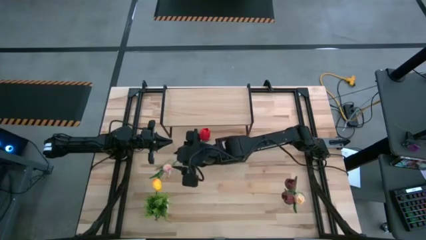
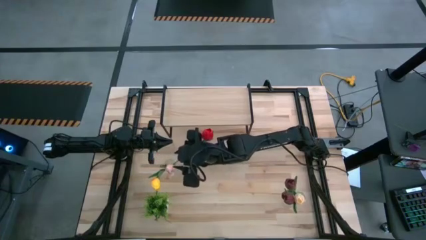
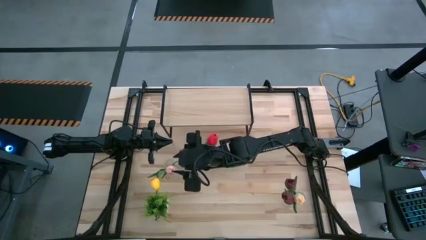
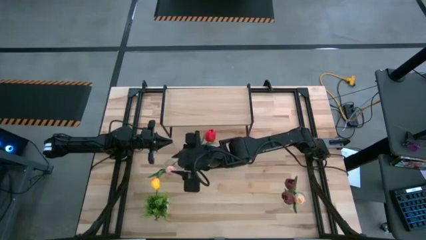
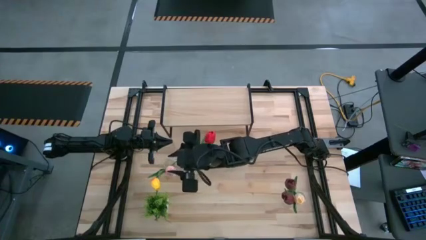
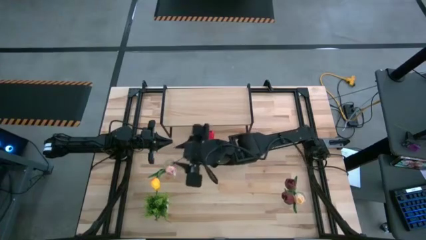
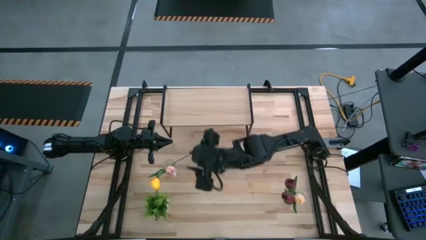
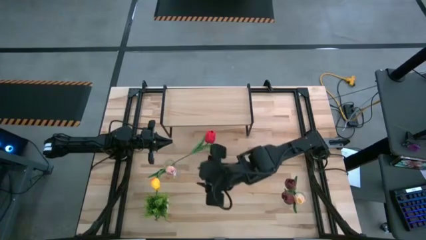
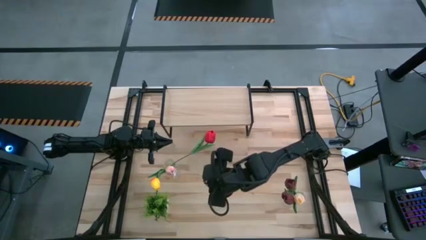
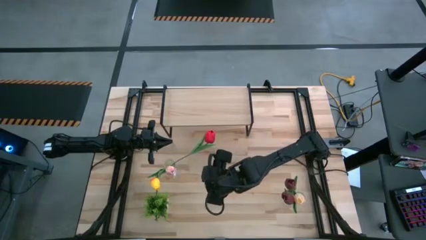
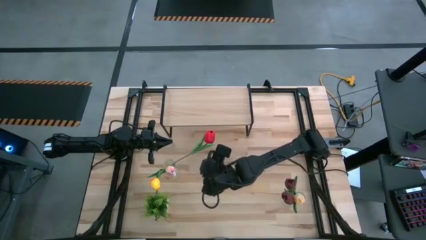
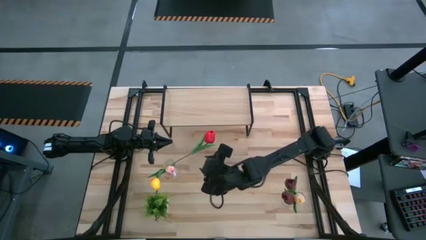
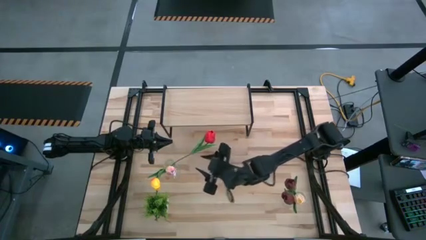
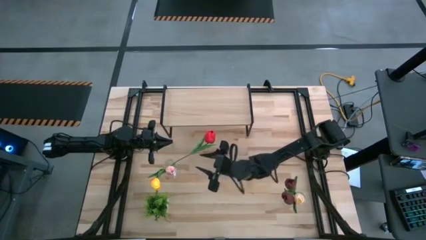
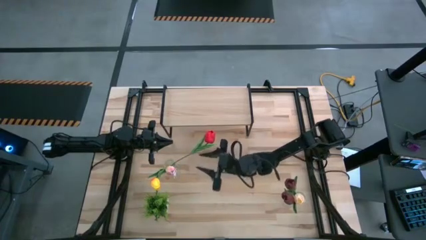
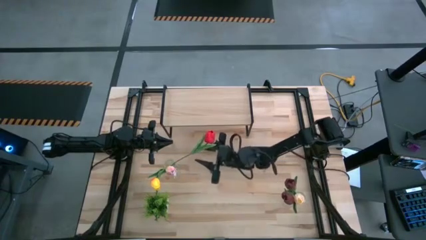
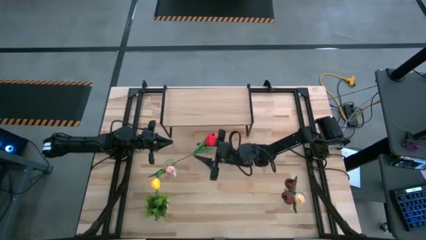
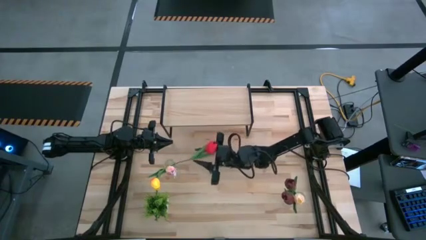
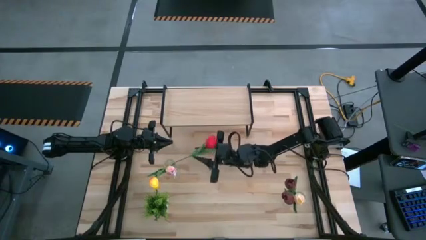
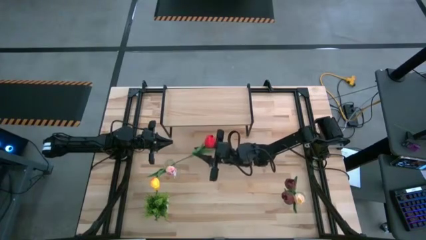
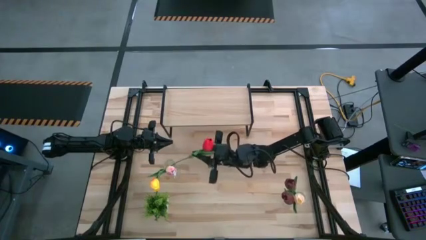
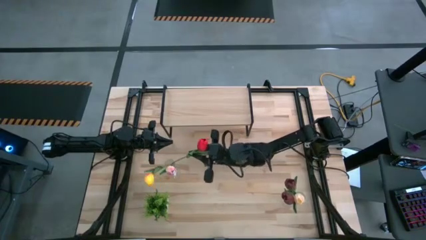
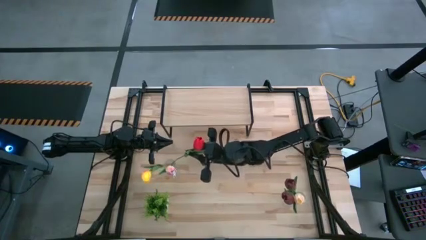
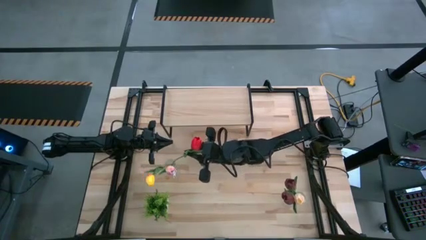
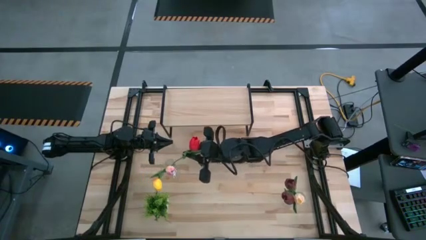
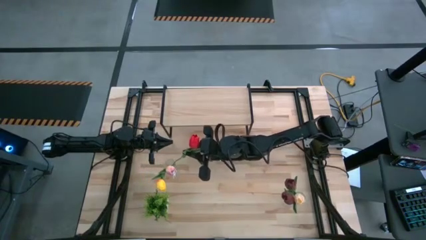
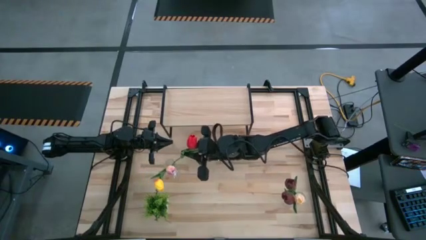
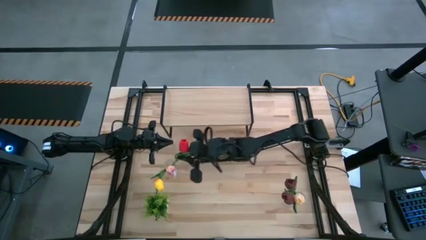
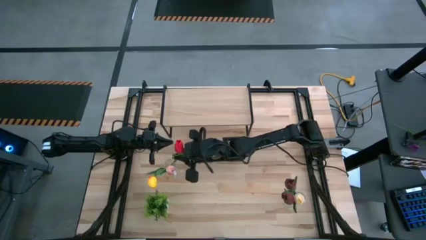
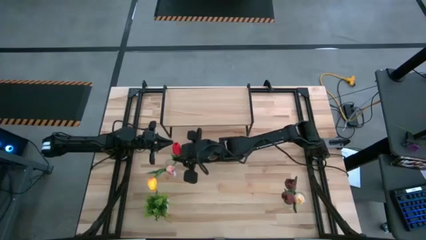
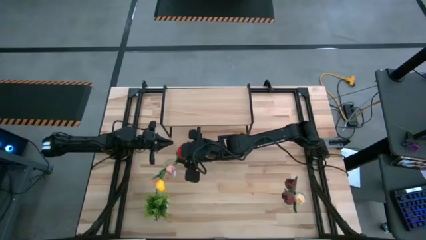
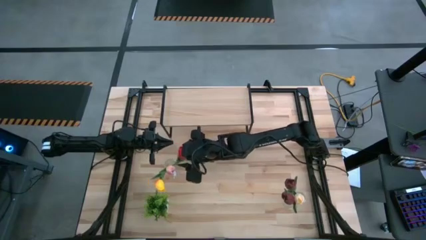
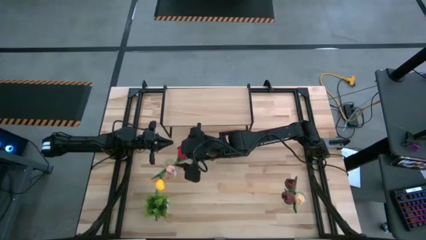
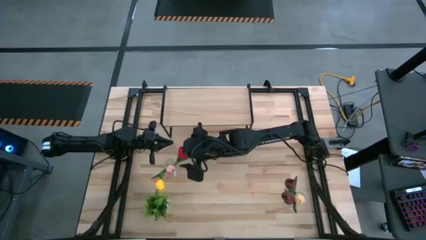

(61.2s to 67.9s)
Task: Pick and place flowers into a vace then onto a shelf
Adjust the red flower in the left transparent flower vase

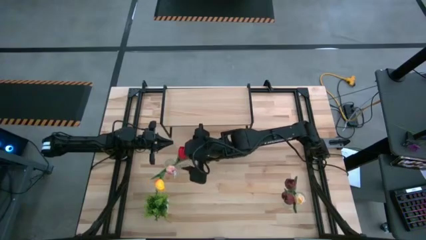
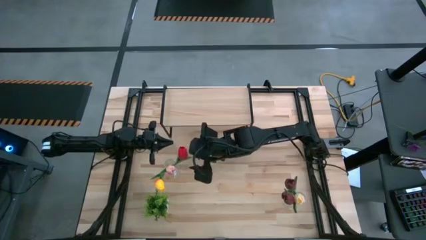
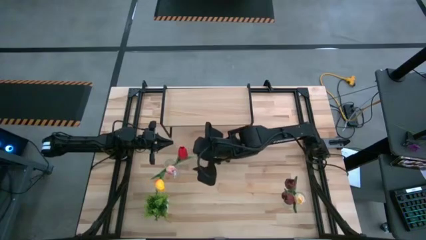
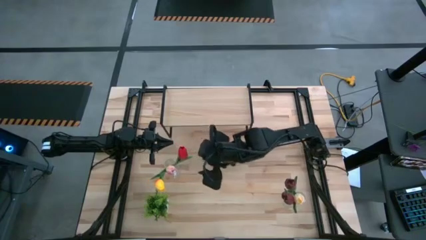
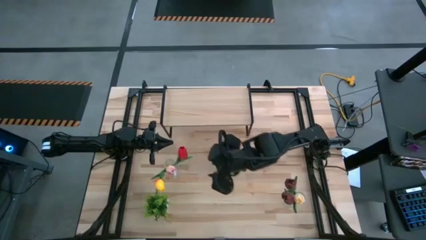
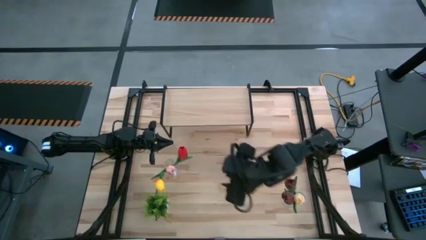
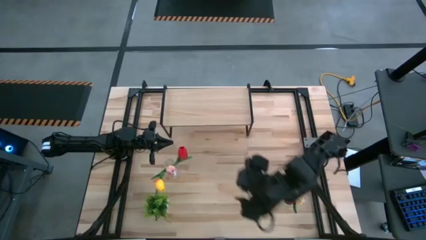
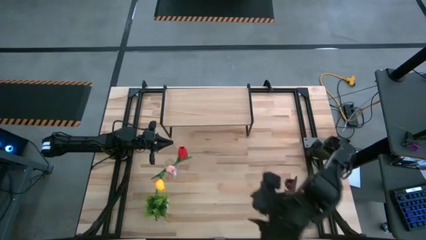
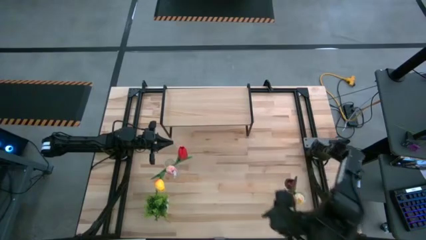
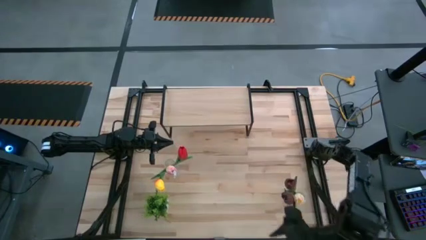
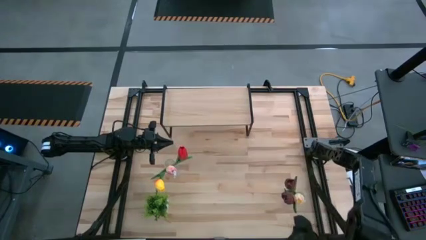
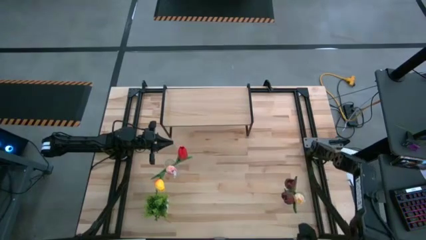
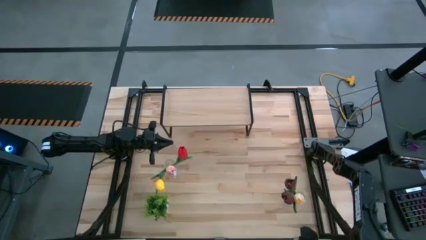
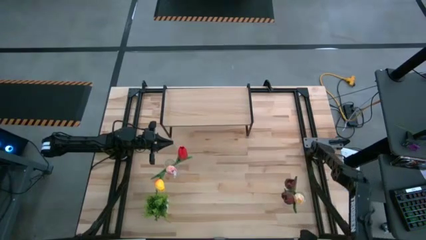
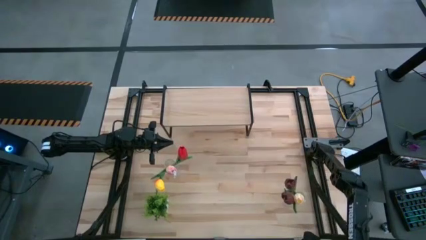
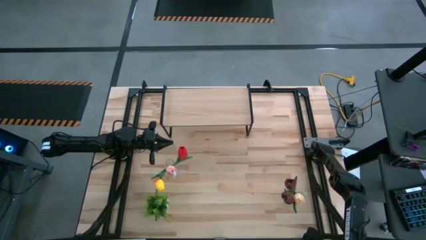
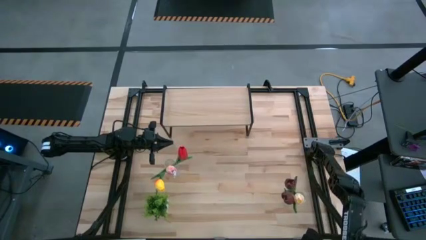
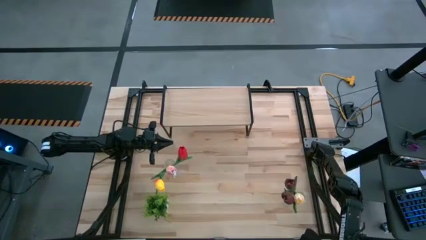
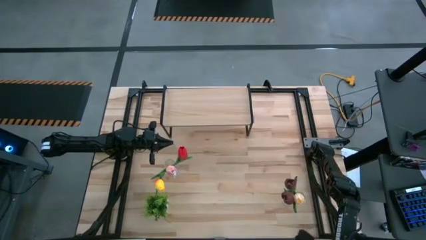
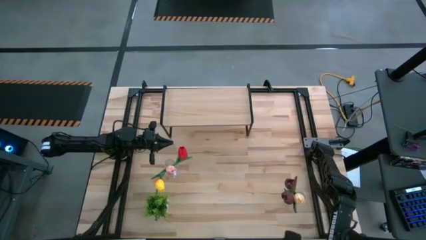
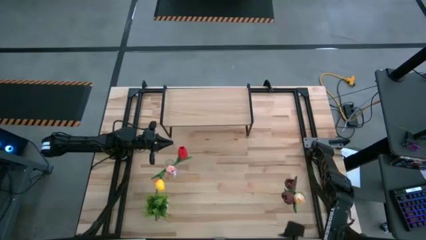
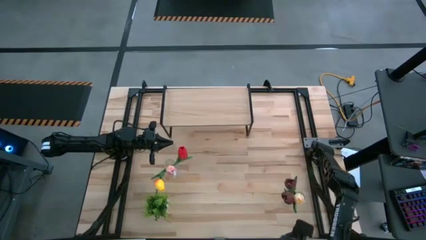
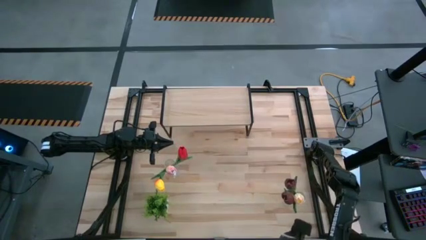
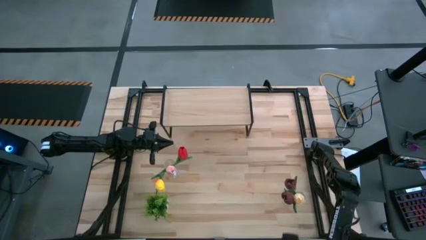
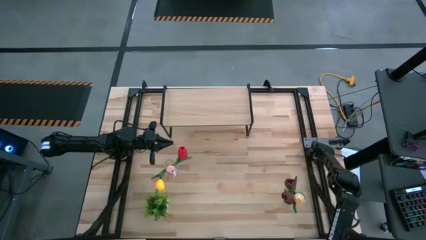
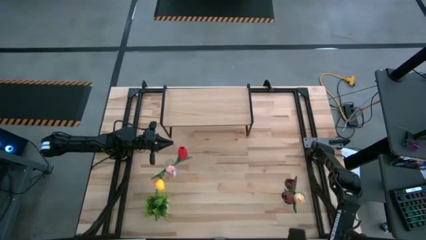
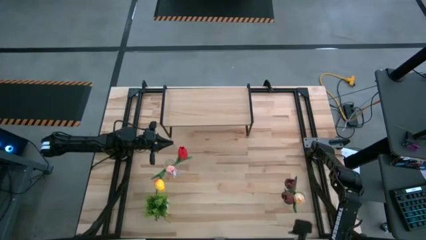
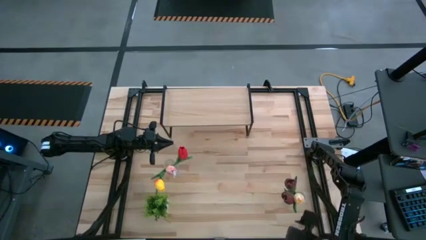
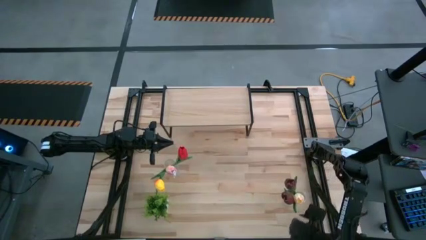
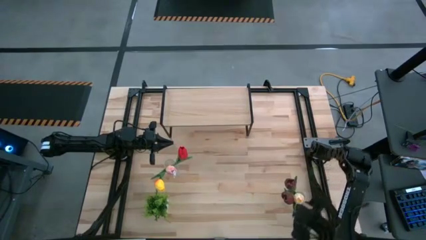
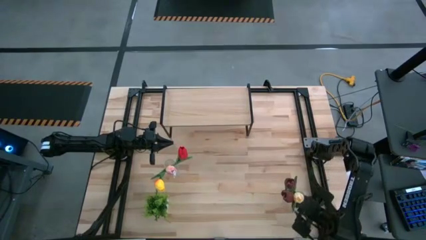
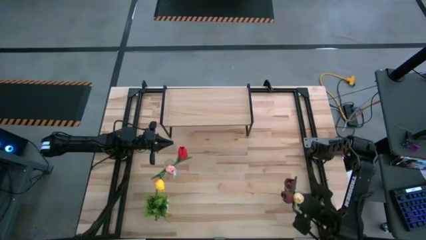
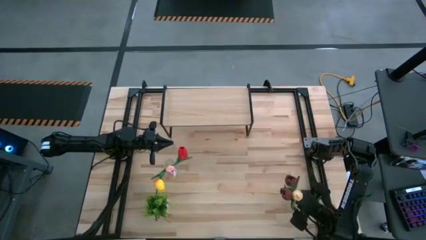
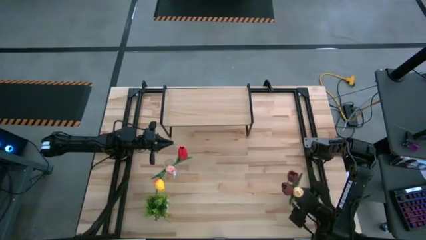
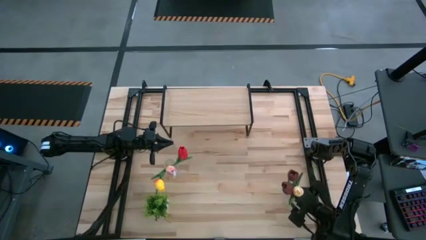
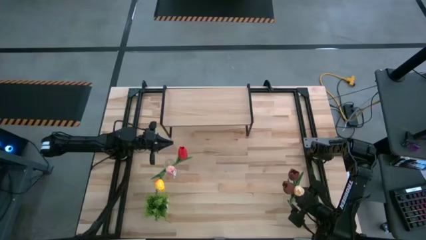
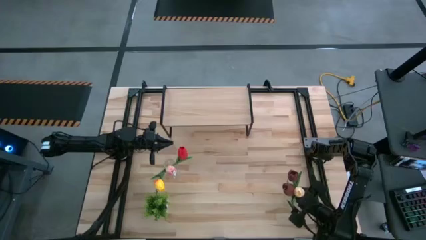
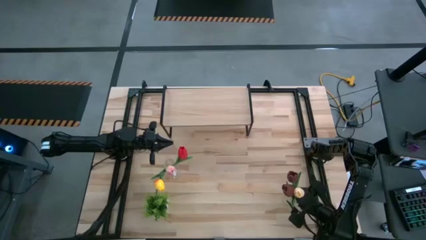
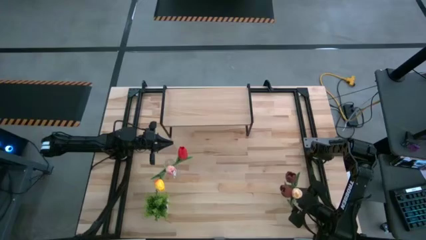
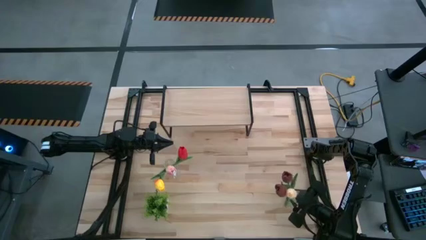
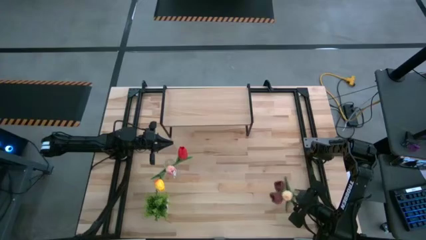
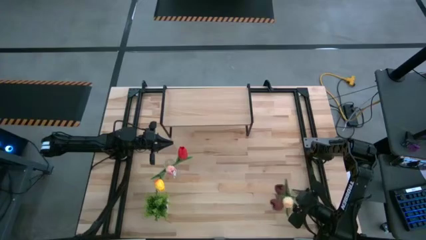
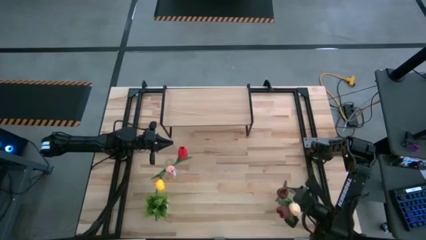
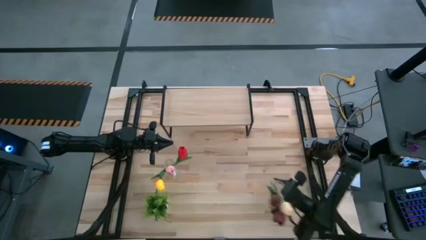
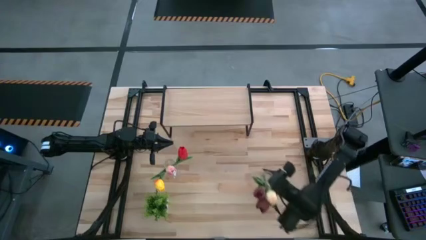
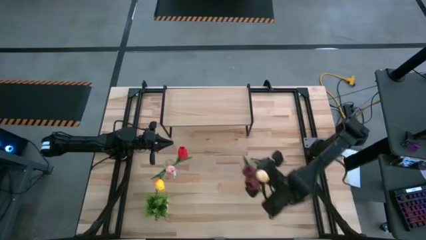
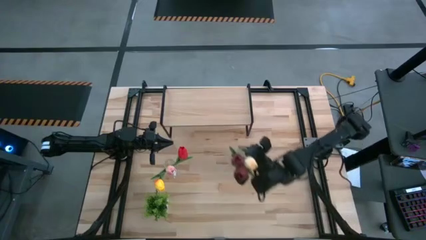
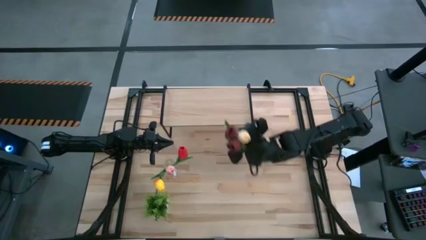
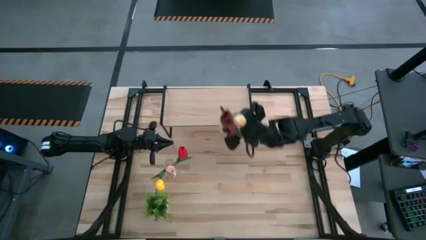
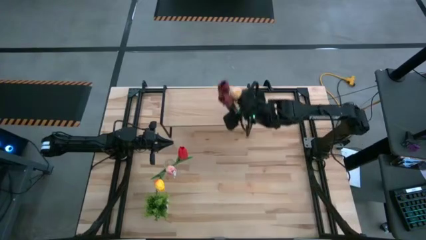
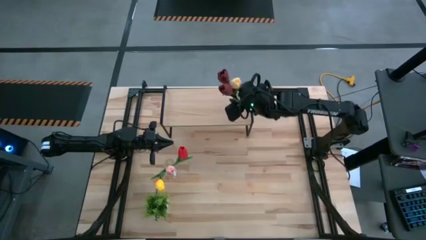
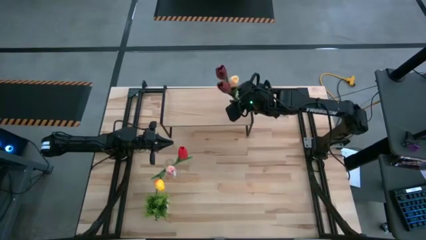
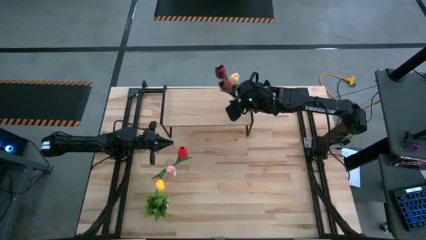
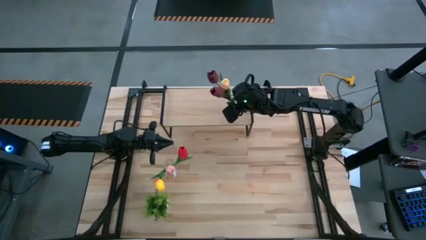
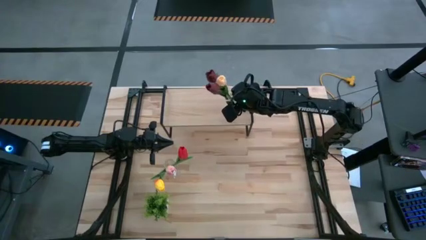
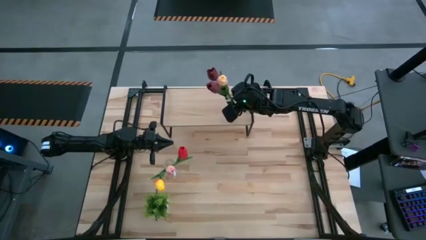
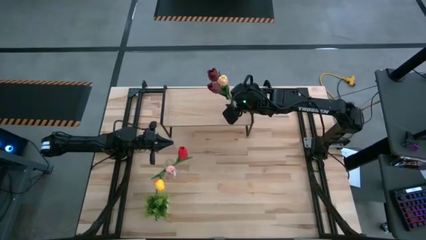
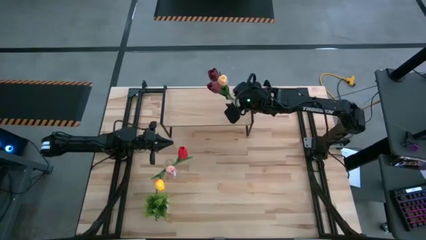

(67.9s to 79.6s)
Put the right transparent flower vase with the flowers on the shelf
